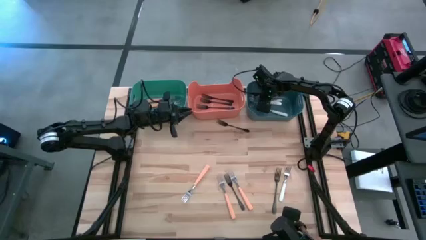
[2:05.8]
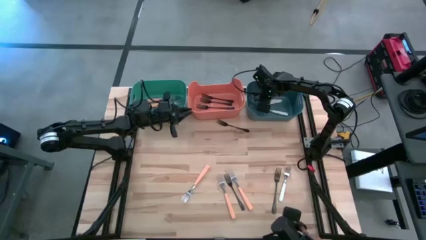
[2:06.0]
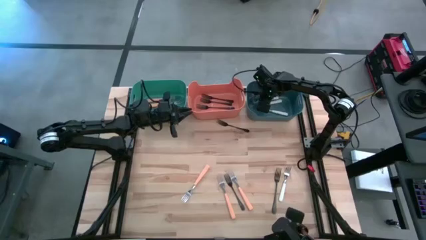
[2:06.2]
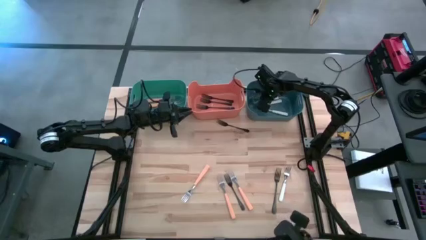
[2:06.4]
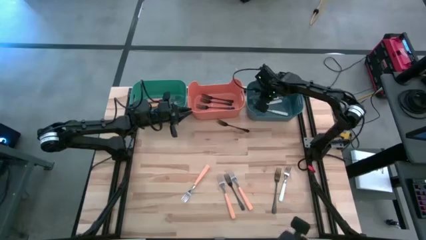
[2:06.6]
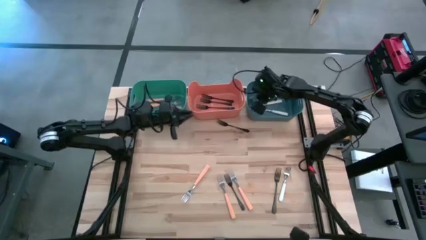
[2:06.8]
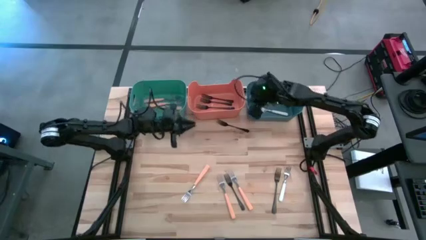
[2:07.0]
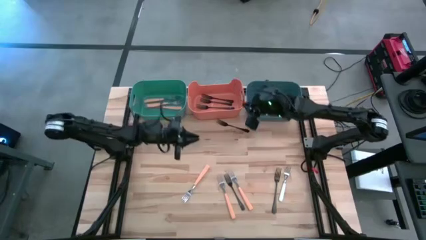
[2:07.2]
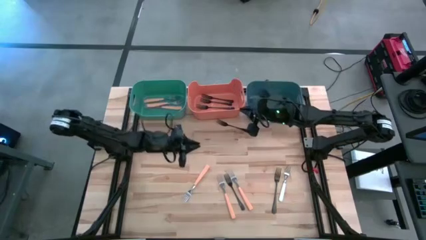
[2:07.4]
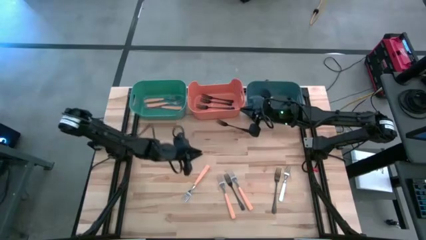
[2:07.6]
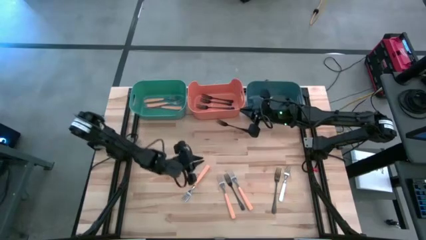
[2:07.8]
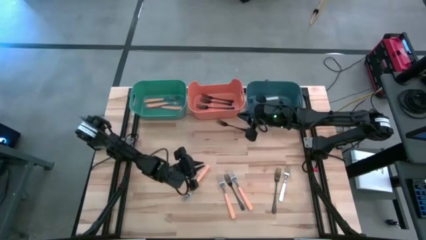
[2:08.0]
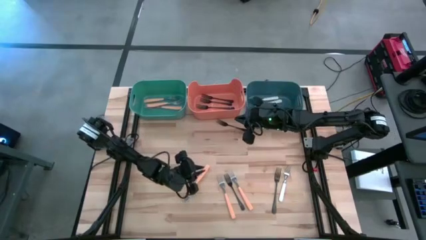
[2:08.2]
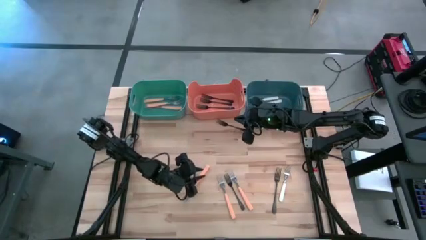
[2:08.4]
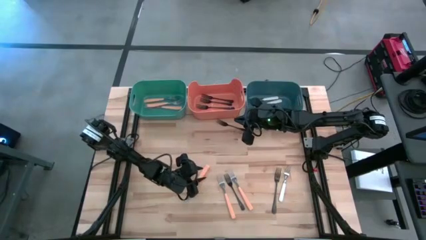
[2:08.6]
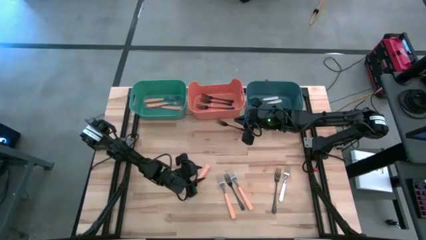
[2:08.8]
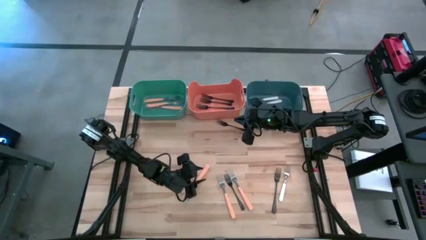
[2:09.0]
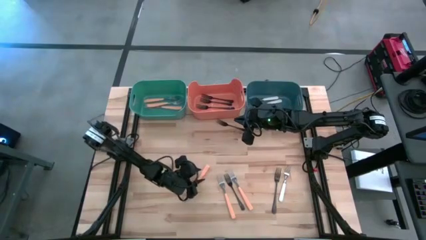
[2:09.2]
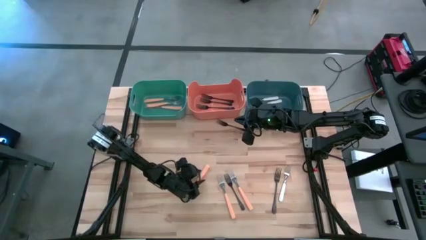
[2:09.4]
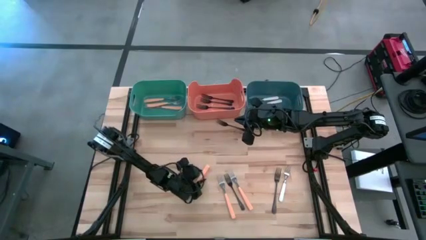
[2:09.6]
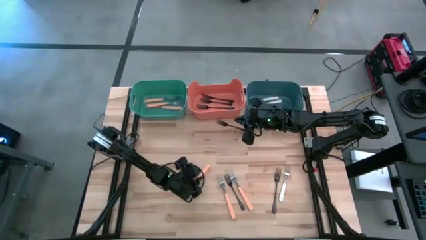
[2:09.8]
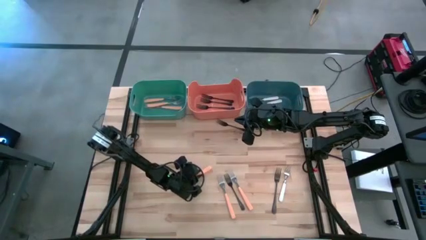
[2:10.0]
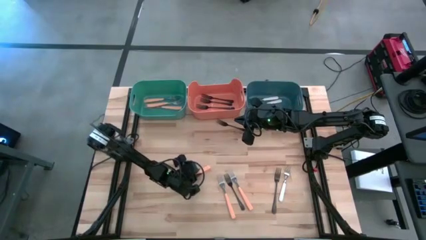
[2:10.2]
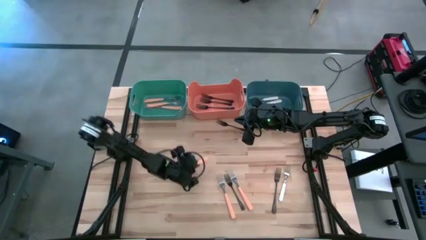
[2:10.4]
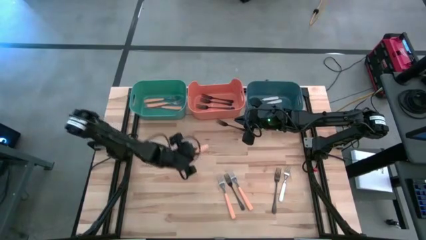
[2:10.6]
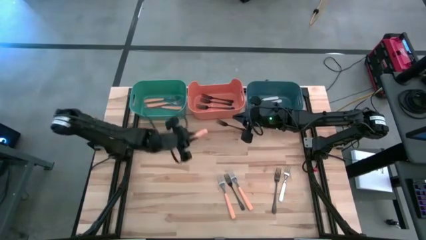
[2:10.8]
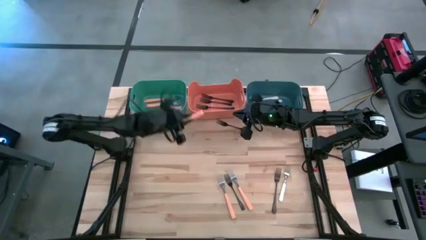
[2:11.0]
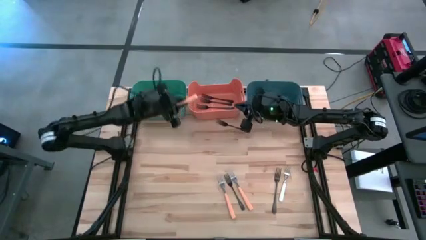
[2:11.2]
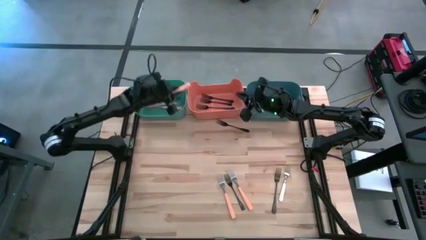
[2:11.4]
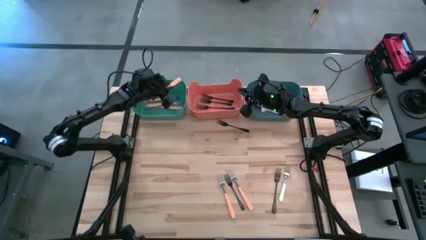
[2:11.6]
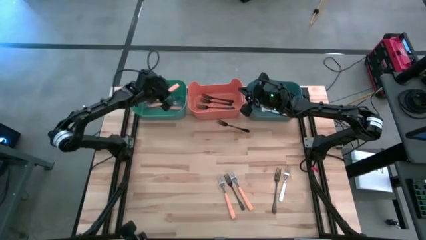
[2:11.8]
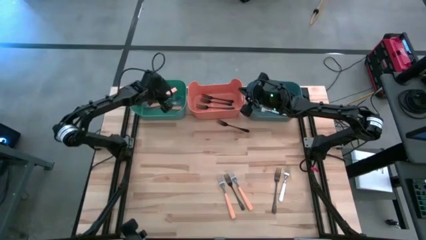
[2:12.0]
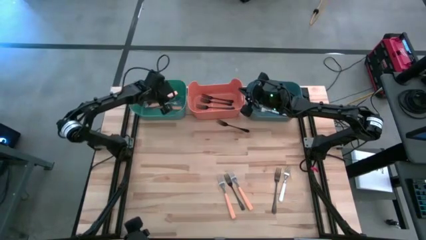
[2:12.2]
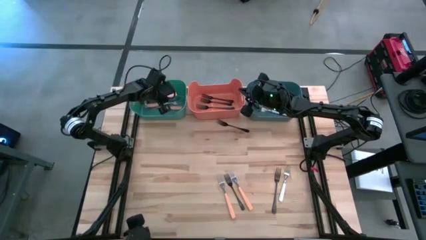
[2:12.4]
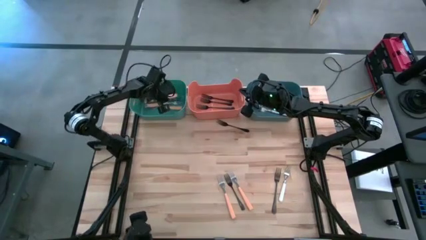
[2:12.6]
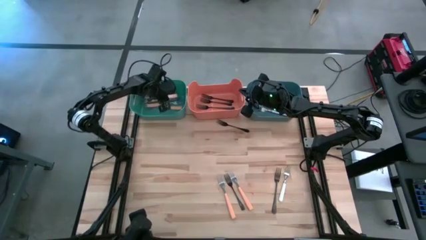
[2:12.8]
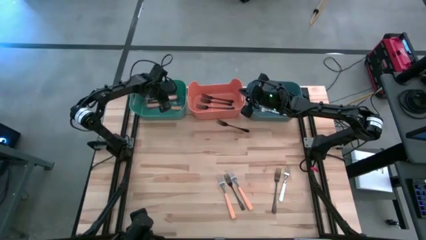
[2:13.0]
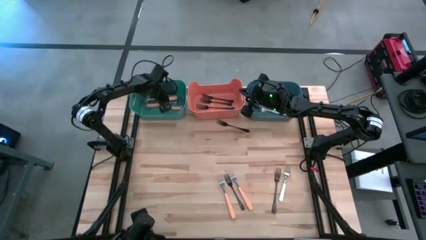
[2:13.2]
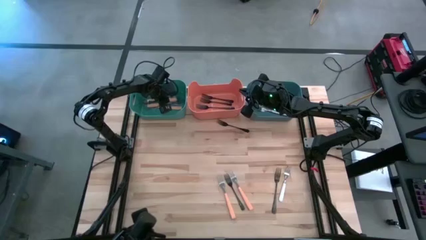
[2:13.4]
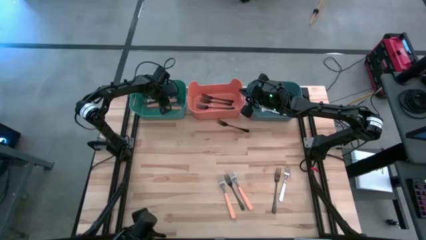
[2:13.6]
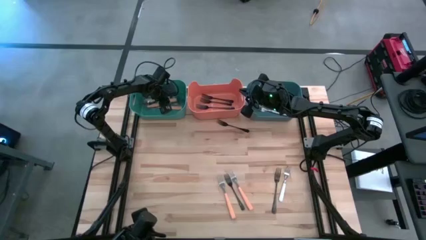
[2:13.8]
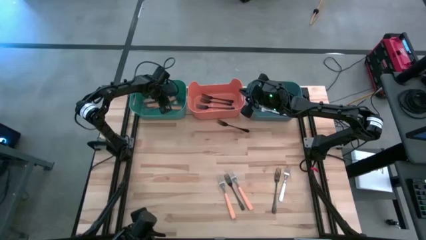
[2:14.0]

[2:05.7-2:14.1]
Task: Sort silverware by color (type)
Put the orange fork into the green bin

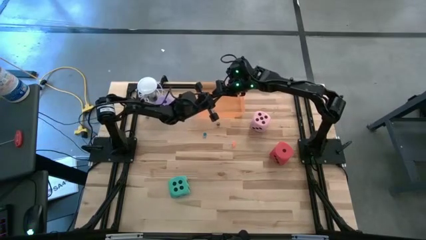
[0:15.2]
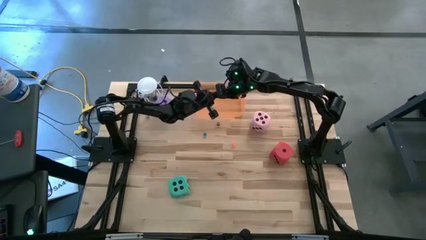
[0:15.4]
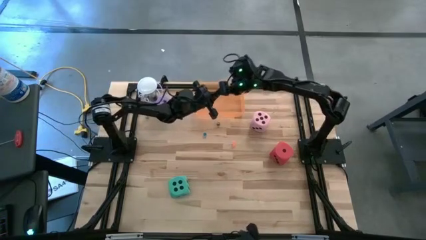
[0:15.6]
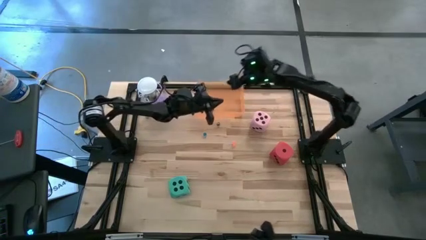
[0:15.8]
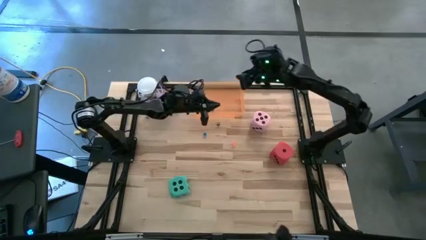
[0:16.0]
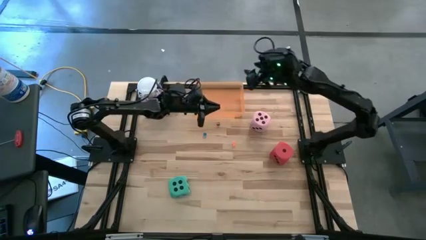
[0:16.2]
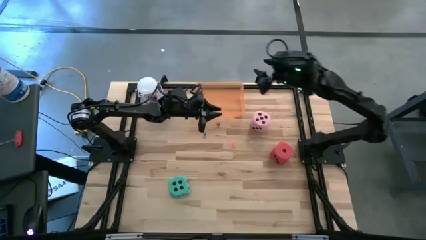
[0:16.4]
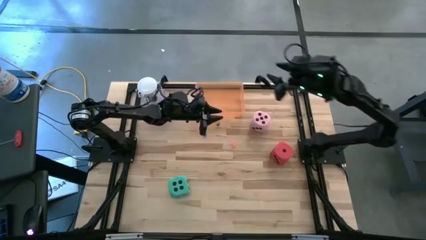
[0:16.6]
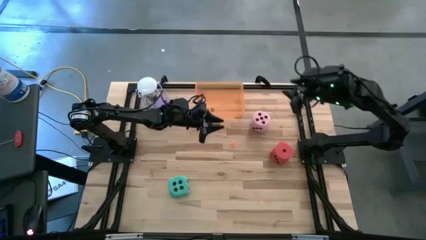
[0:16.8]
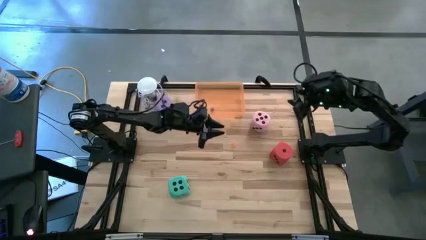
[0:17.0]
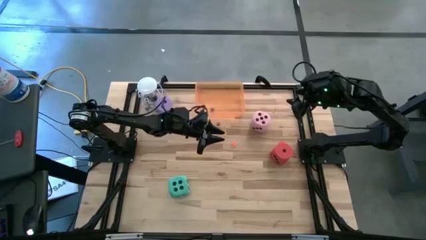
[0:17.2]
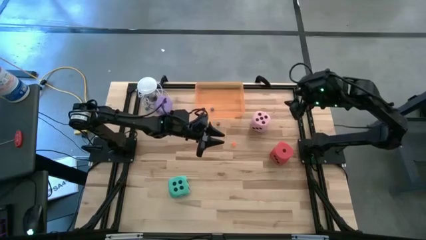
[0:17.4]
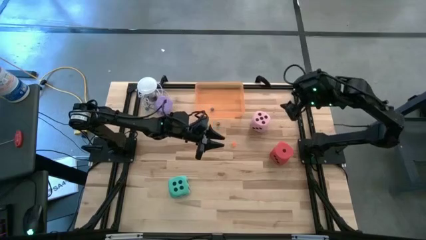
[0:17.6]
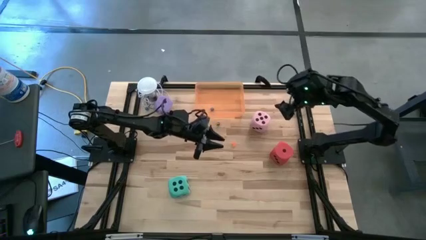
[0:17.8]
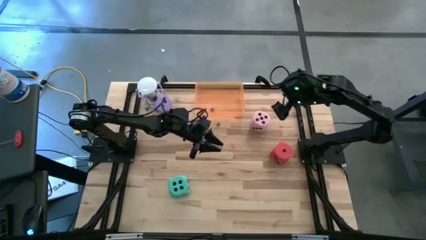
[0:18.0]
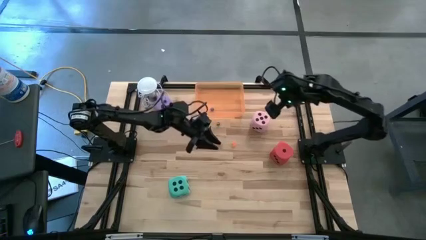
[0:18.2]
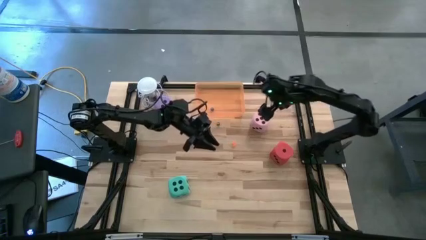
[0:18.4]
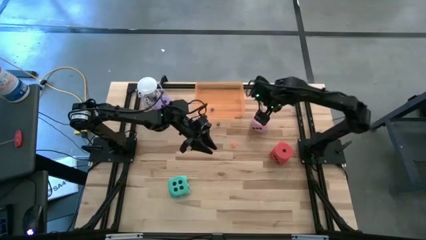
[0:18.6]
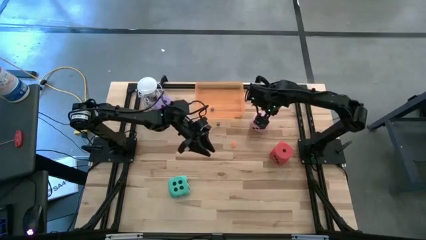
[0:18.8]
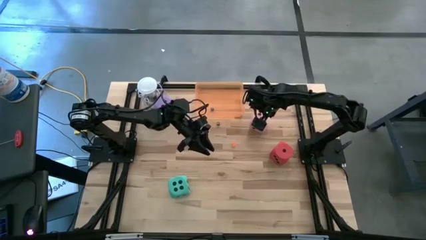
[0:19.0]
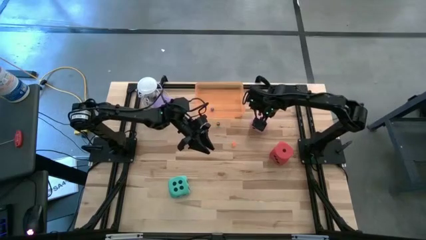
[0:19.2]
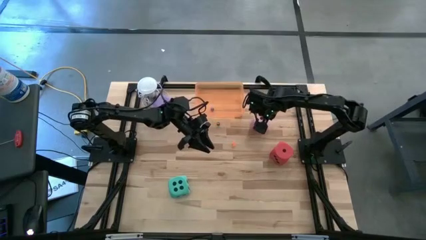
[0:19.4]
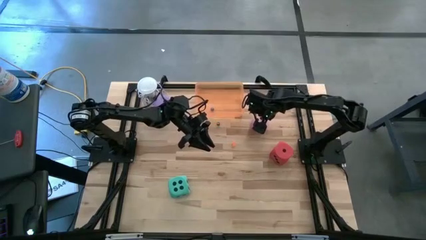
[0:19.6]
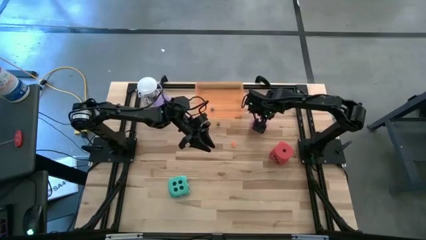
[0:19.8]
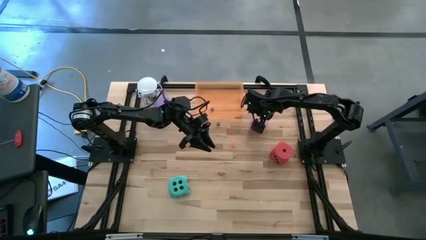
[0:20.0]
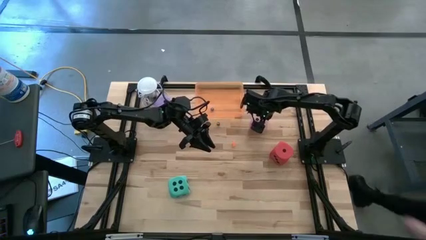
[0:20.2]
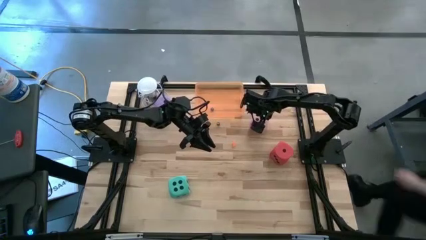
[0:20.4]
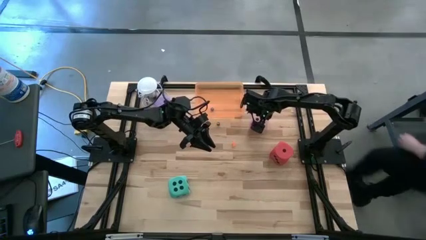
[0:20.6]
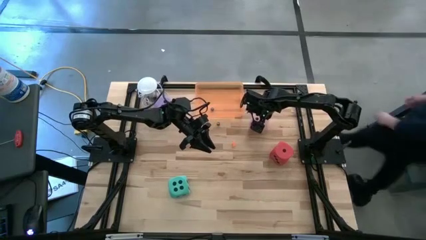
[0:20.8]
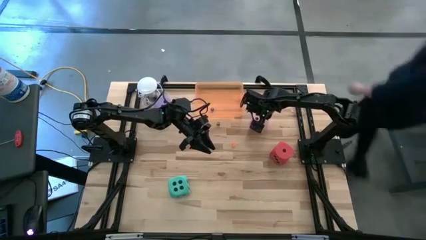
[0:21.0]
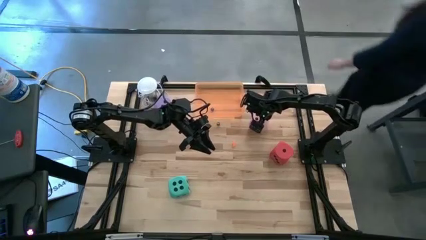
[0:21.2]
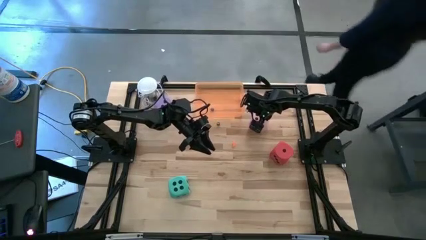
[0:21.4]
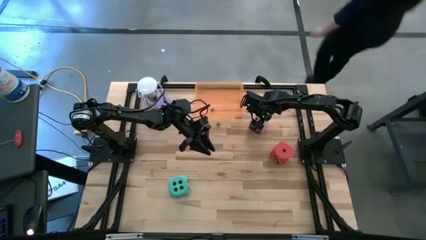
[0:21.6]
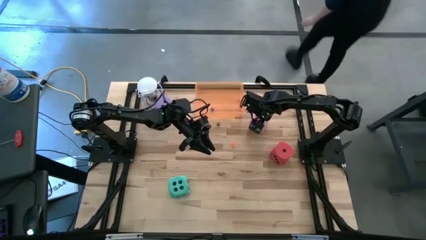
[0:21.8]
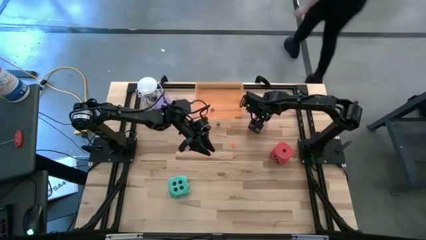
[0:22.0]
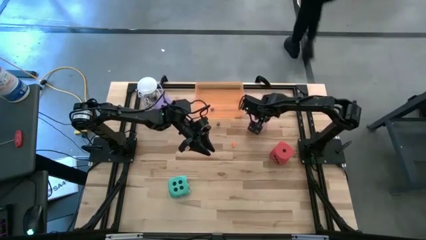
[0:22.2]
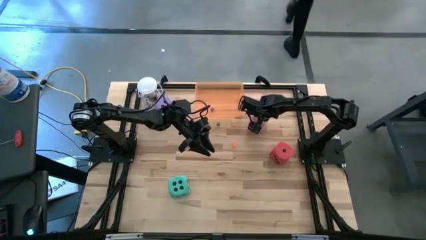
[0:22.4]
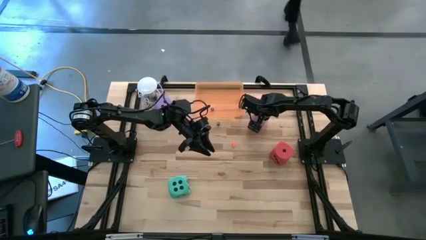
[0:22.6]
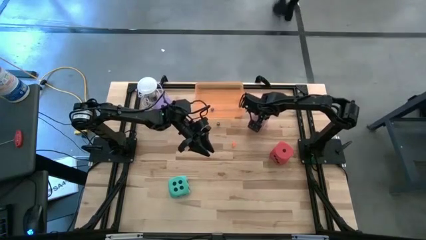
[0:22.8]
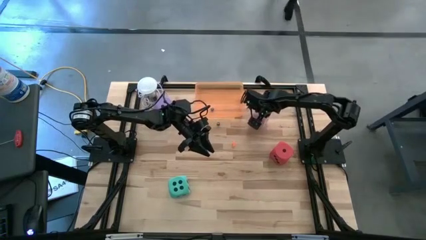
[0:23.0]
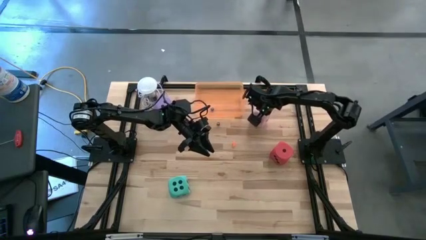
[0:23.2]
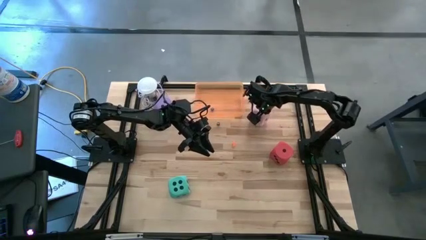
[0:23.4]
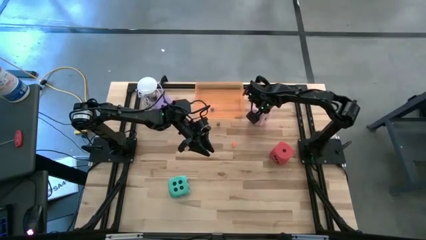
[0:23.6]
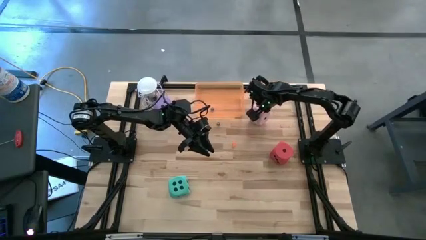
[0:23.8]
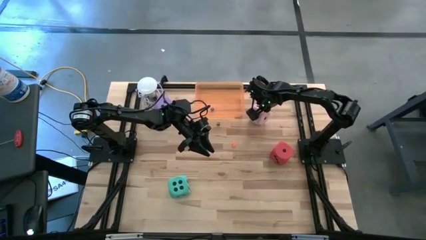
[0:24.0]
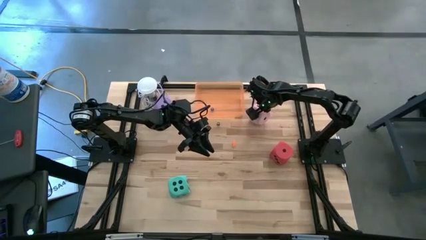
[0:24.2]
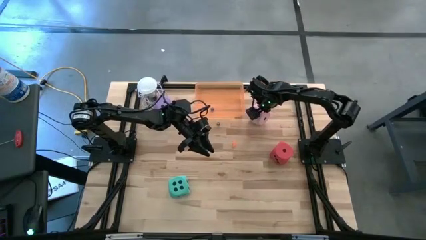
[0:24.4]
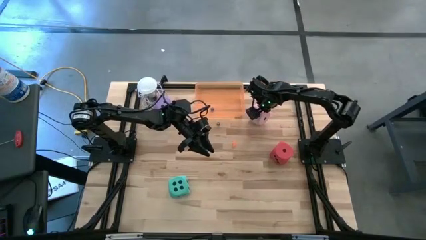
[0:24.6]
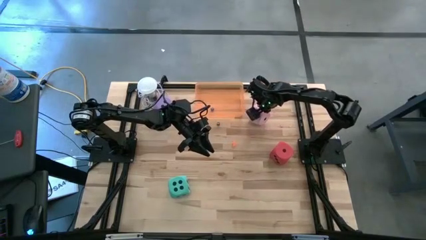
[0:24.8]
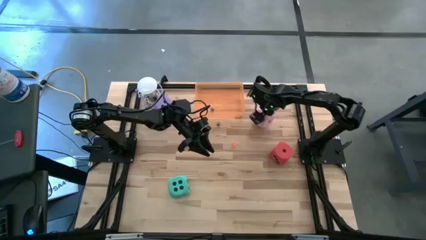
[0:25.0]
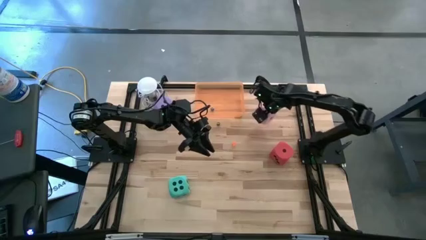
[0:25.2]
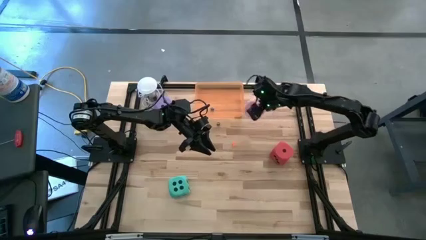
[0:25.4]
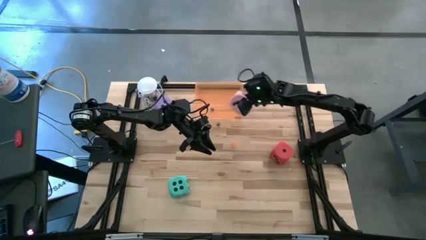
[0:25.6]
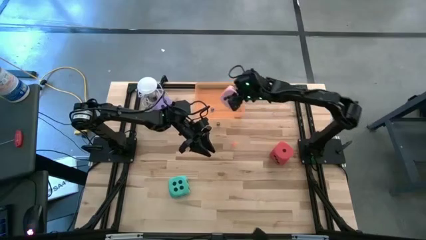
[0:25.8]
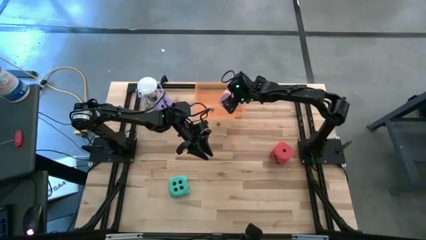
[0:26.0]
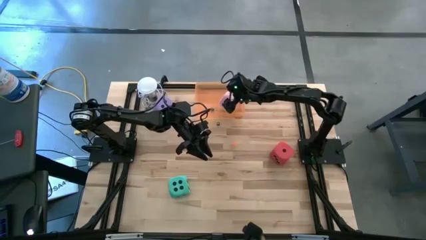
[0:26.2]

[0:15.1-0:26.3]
Task: Pick & Place Dice
Put the large pink dice into the orange bin
